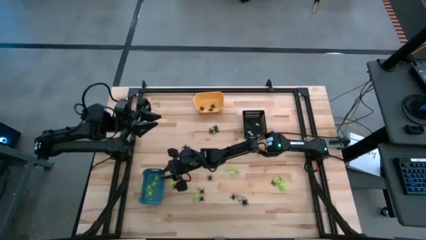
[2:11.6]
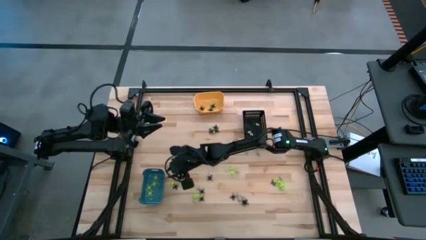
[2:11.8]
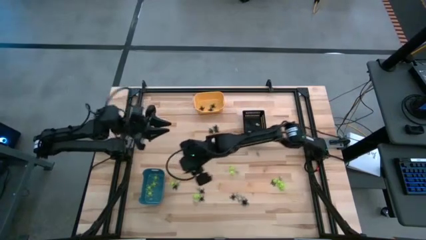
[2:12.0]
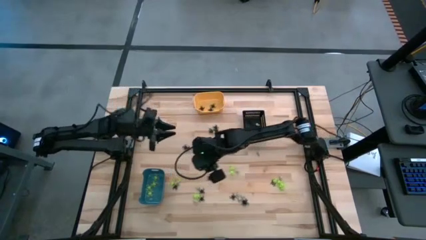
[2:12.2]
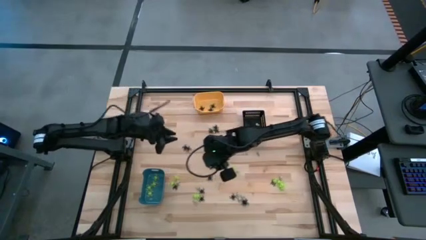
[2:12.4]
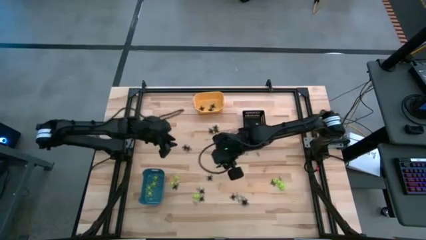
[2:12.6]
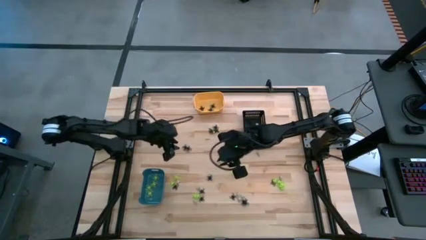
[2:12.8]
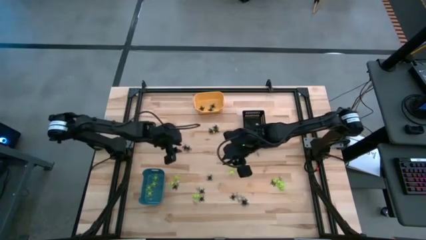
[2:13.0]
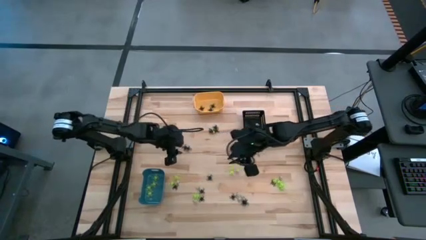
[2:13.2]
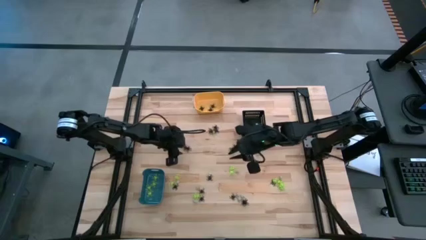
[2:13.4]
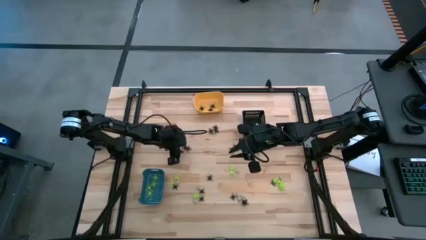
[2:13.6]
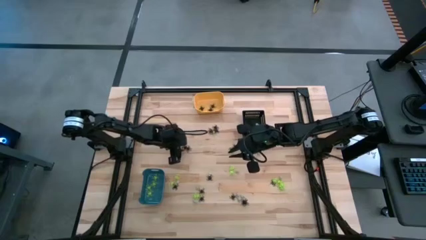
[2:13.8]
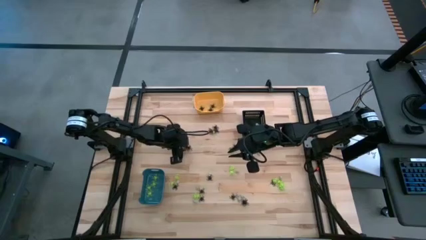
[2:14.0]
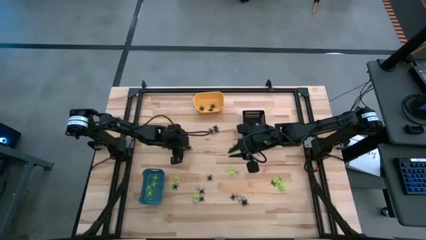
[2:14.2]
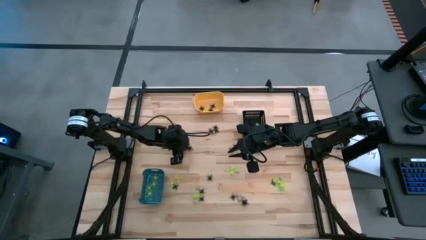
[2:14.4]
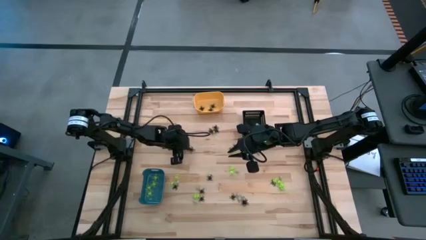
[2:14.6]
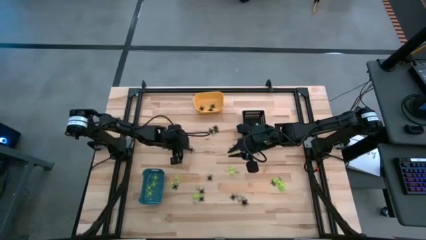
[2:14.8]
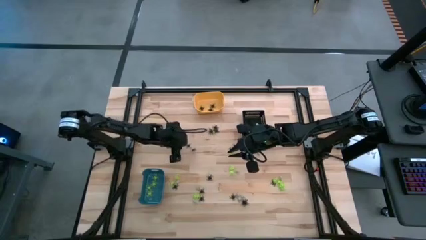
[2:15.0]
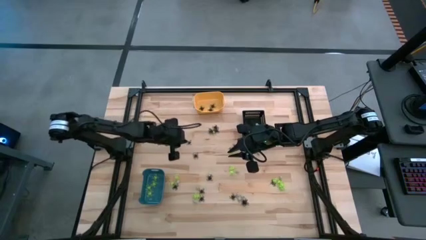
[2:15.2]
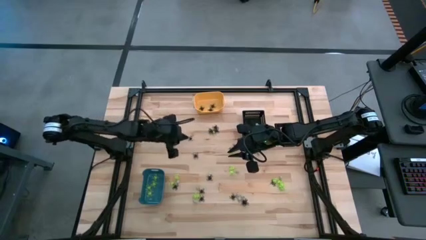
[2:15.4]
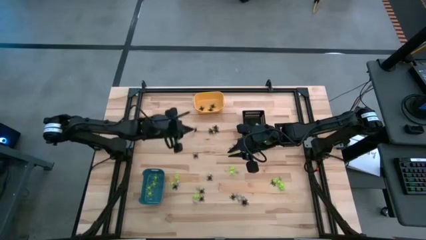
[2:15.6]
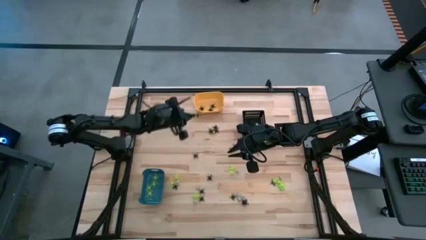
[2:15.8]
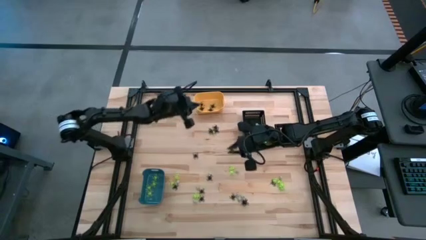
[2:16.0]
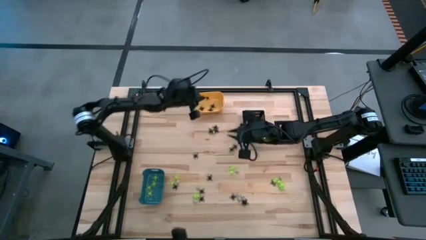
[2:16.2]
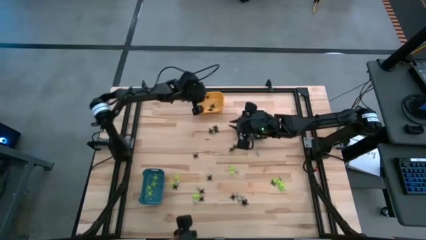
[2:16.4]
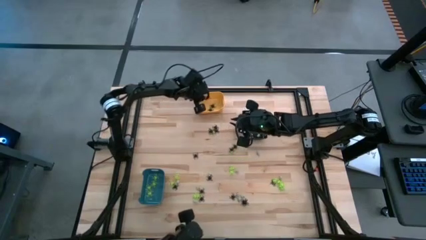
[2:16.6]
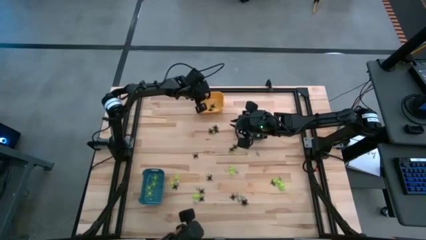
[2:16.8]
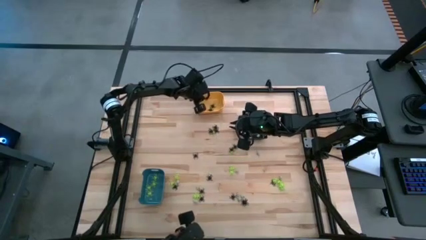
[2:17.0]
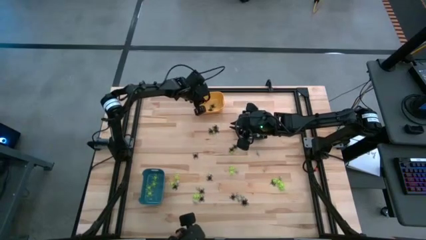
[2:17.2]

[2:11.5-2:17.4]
Task: Sort Halloween decoration
Put the black spider toy into the yellow bin

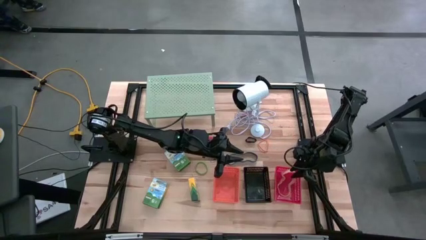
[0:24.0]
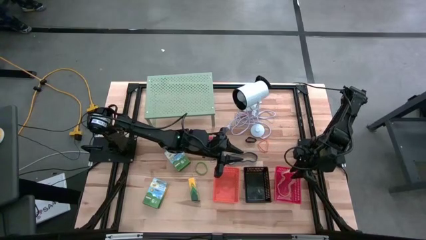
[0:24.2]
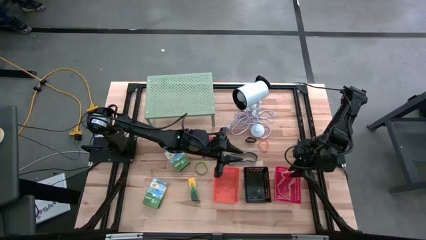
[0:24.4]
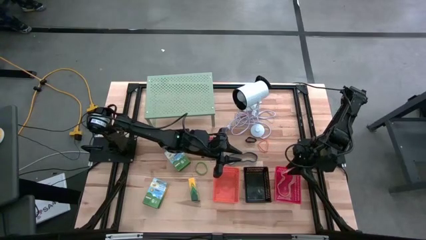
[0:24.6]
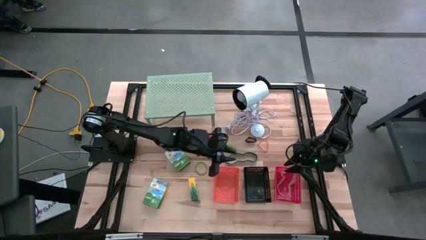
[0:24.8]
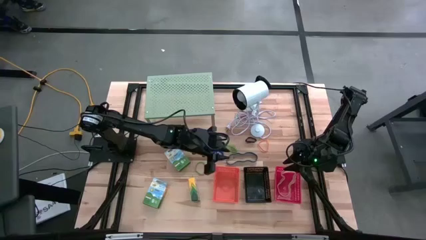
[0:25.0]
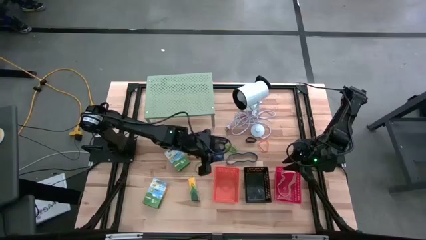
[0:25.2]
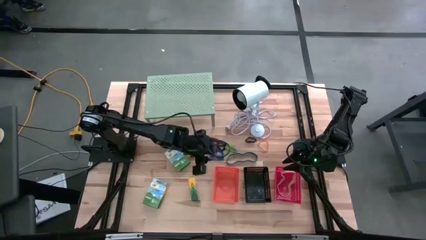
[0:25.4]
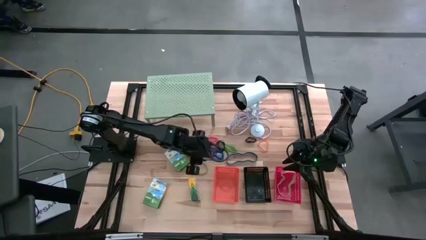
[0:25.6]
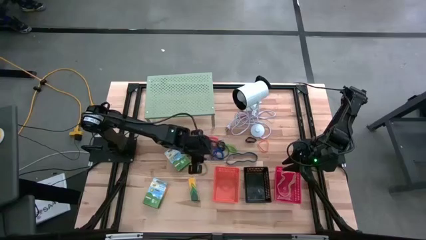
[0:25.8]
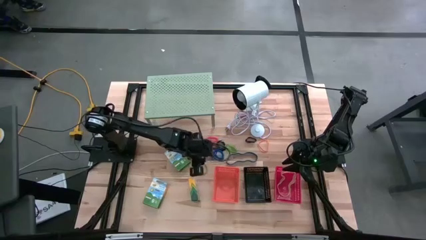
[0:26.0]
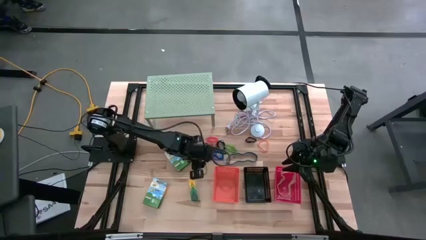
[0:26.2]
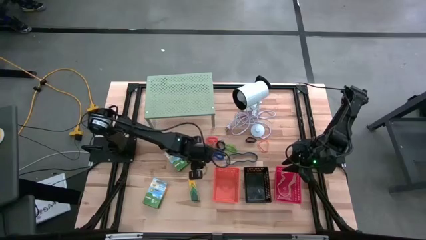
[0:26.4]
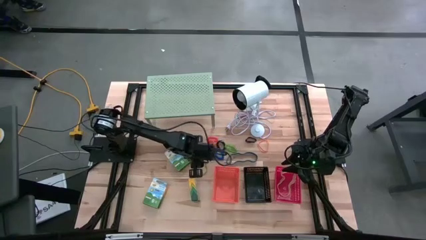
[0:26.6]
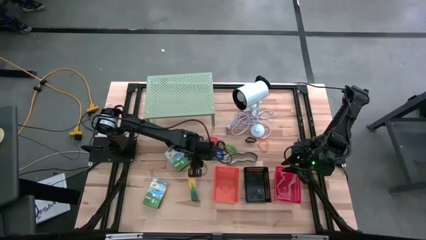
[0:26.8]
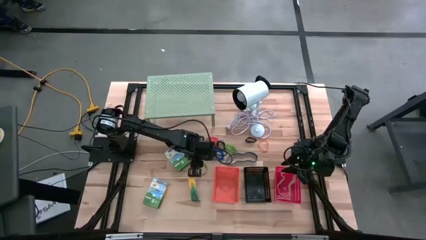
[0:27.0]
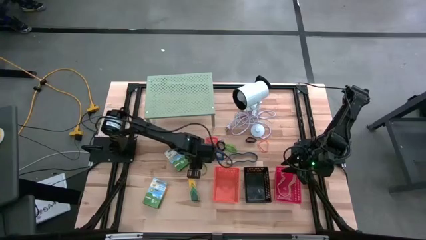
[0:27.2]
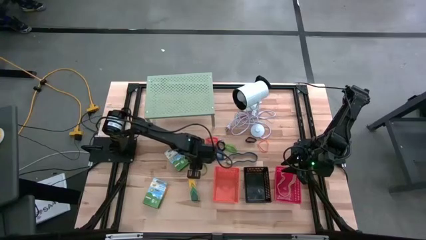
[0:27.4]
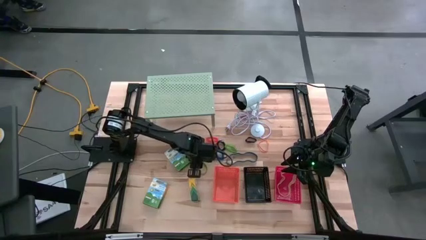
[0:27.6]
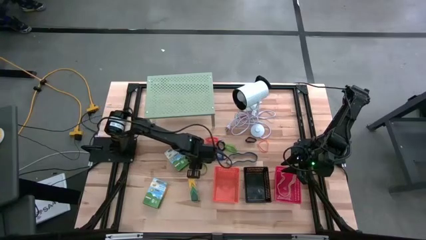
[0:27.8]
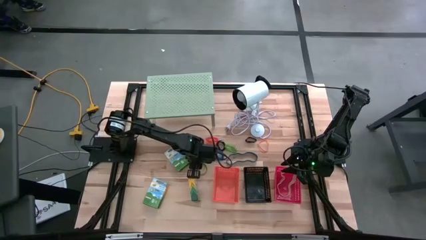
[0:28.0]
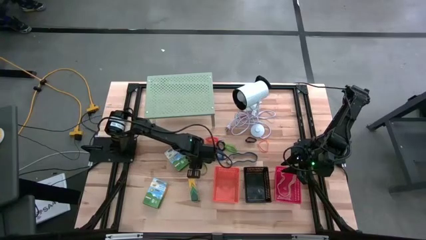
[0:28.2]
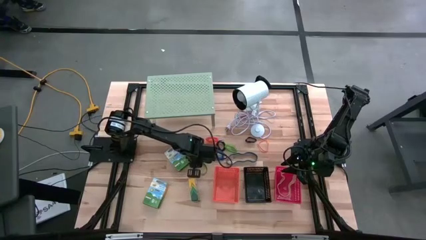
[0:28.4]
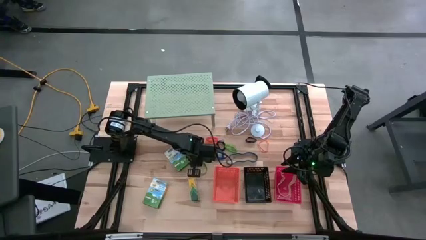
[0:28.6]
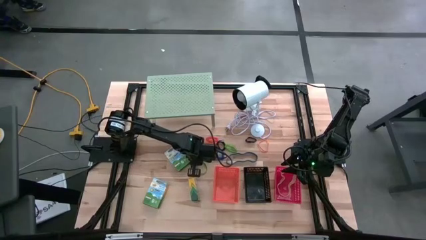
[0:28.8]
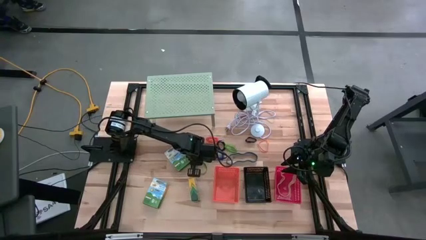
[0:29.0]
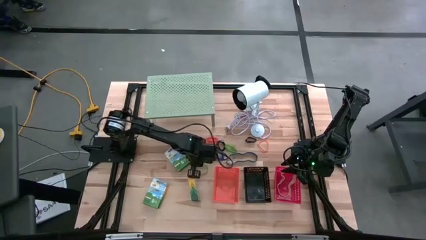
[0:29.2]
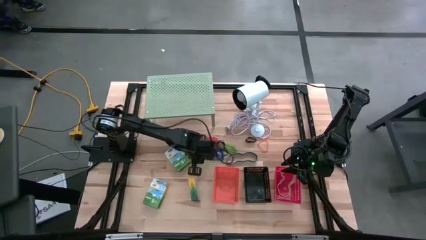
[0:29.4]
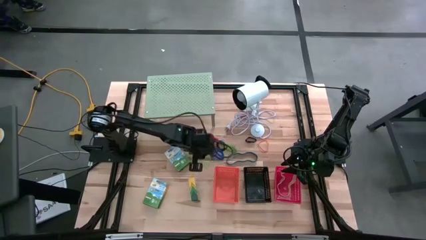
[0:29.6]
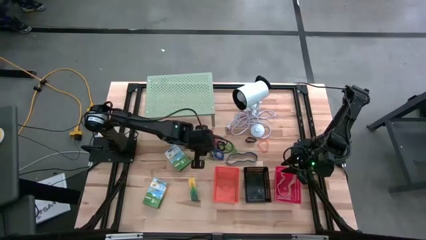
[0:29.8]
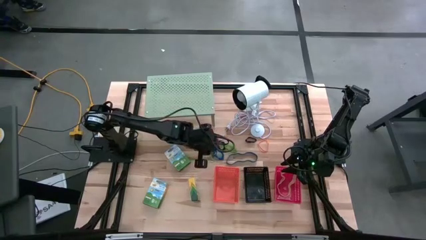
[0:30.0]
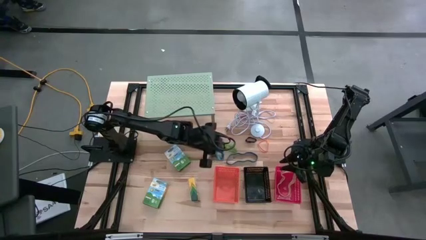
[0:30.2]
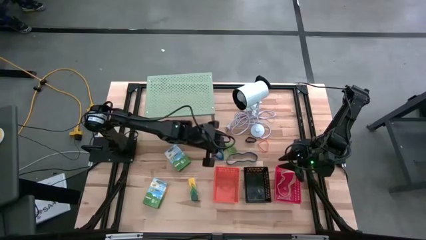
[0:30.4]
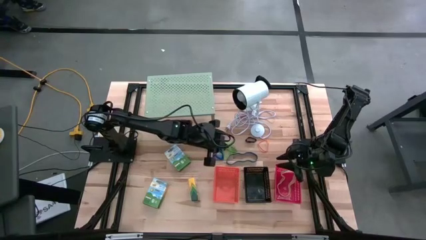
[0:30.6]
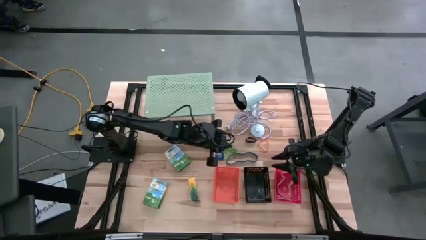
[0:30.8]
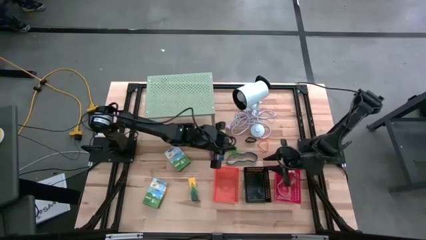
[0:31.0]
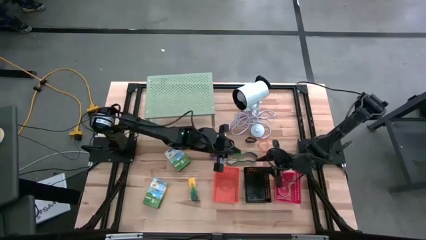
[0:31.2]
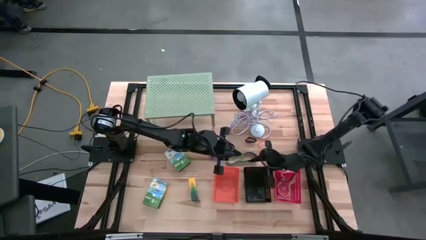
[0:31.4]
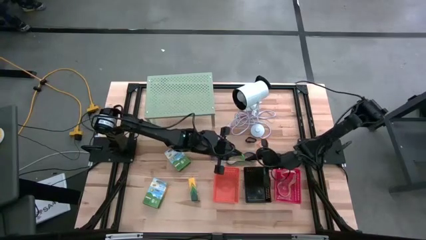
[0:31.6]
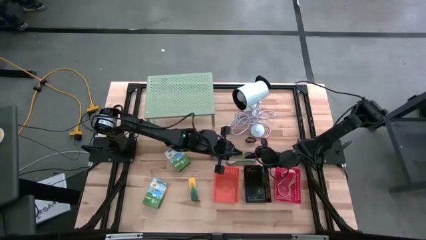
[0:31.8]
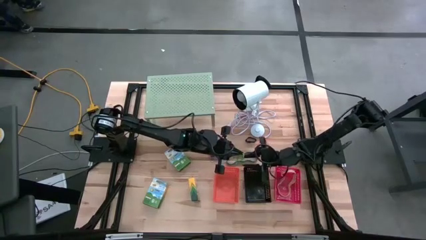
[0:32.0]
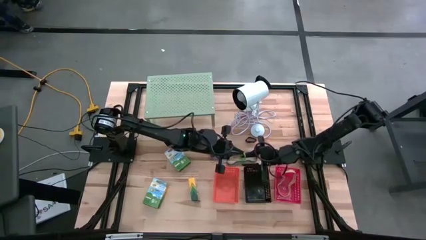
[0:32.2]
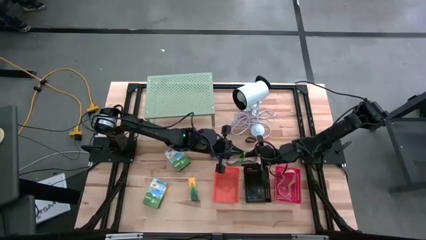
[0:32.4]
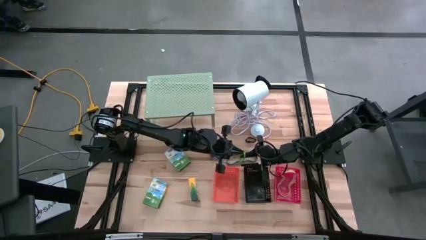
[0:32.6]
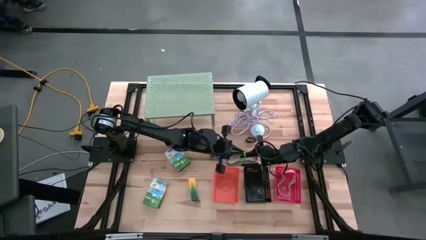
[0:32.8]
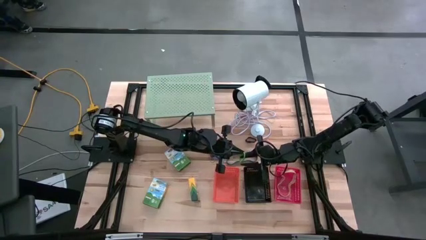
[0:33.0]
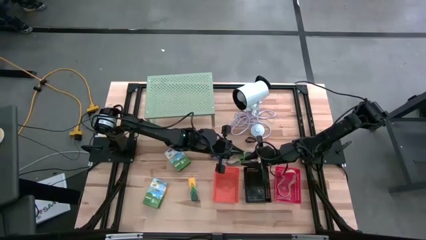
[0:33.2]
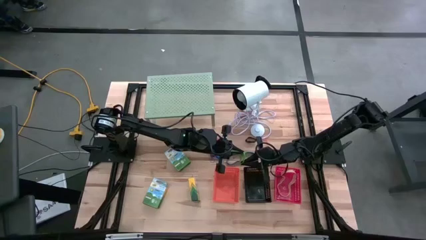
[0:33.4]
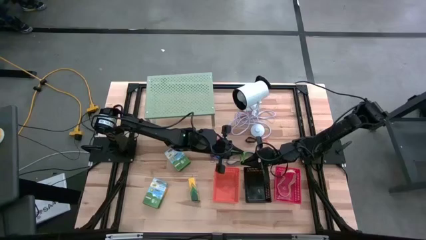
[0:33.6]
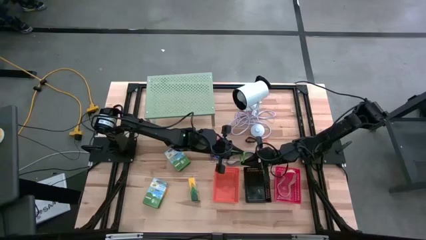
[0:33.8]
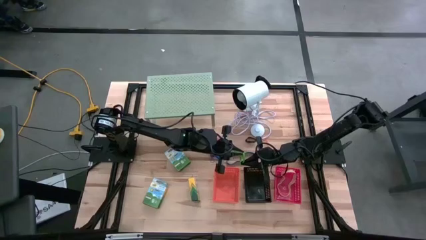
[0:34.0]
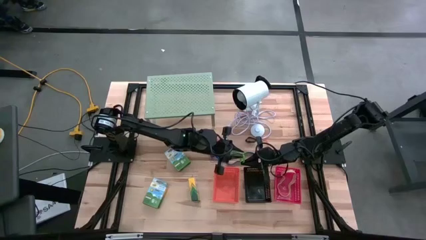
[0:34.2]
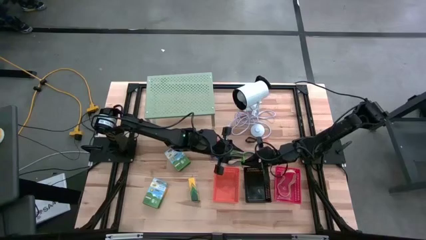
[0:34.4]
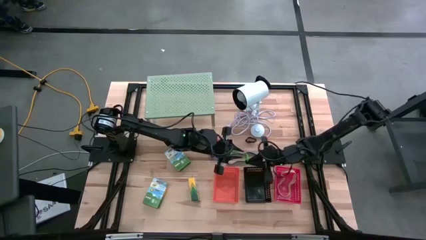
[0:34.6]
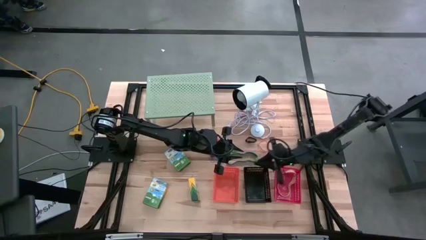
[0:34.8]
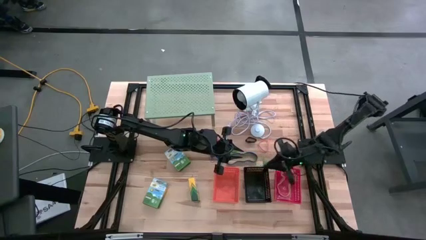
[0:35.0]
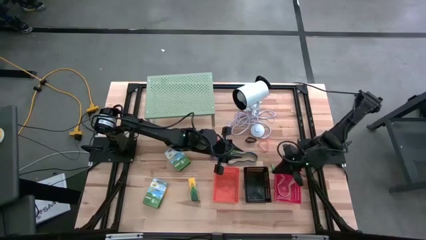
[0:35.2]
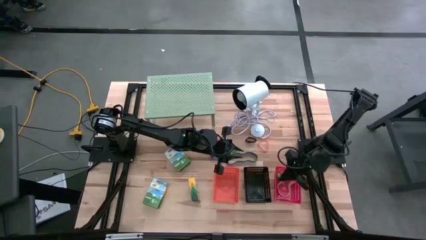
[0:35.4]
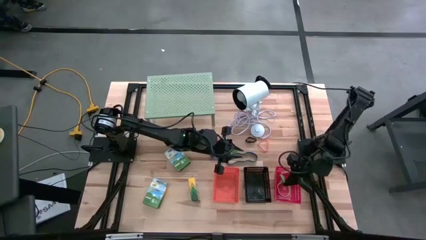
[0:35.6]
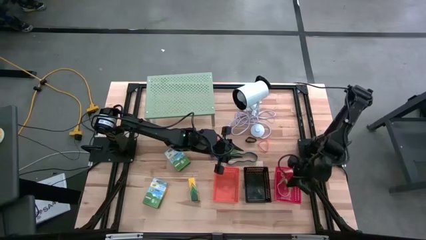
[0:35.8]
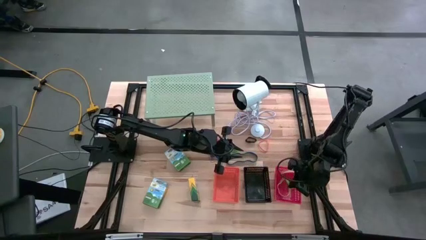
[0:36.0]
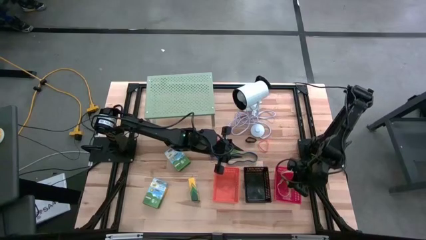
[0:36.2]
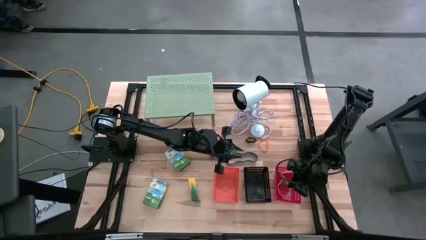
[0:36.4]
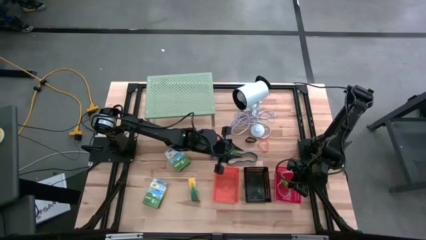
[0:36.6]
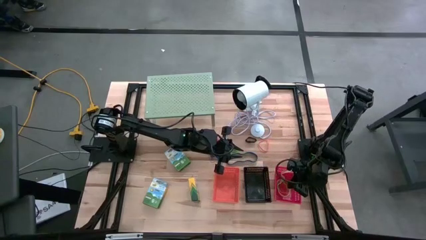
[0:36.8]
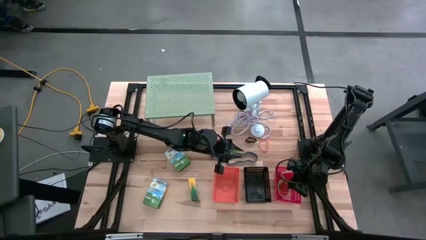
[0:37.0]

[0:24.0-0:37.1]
Task: Pick & Place Office Desk Supplies
Put the green rubber band into the red basket
